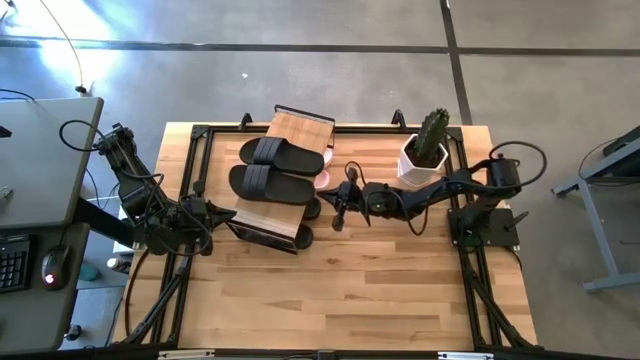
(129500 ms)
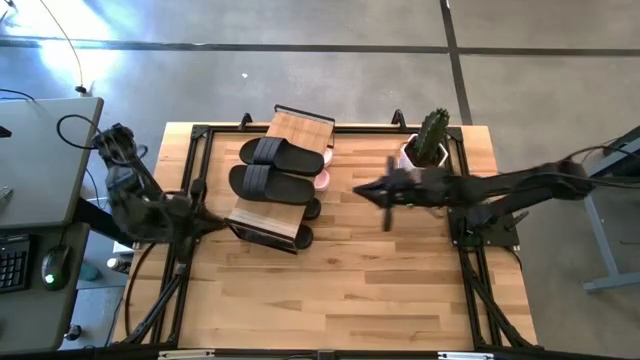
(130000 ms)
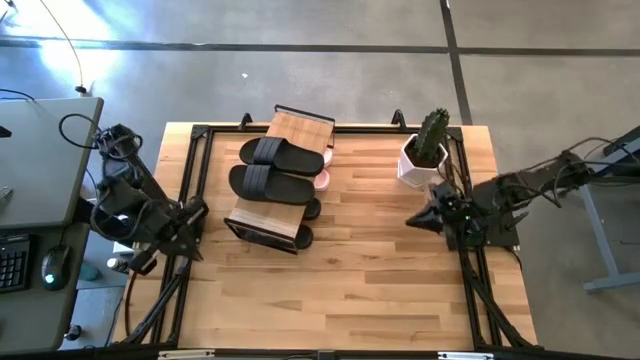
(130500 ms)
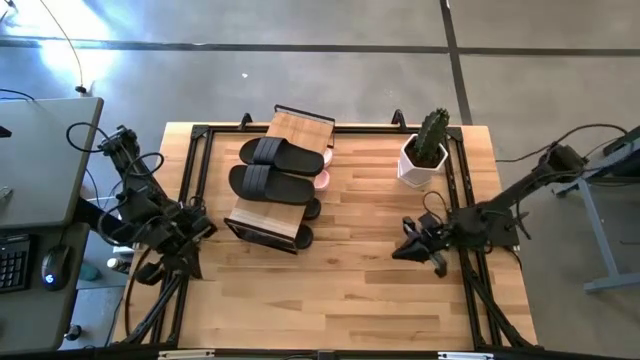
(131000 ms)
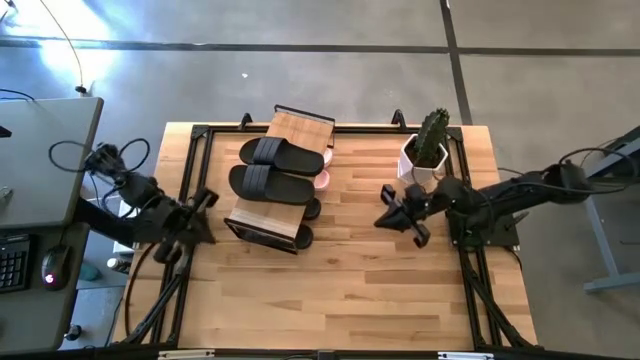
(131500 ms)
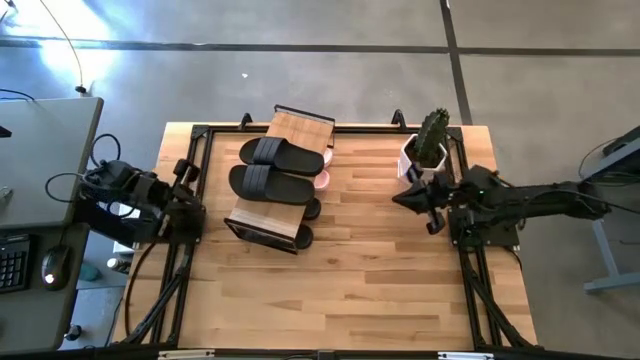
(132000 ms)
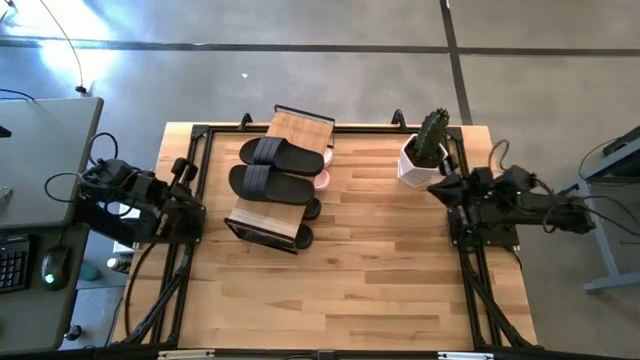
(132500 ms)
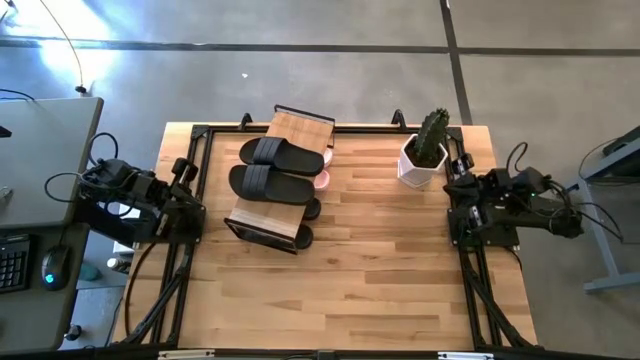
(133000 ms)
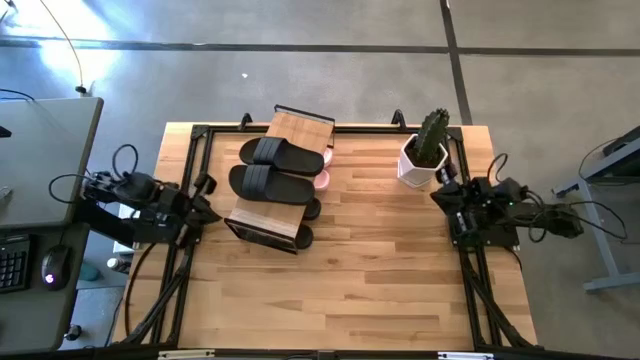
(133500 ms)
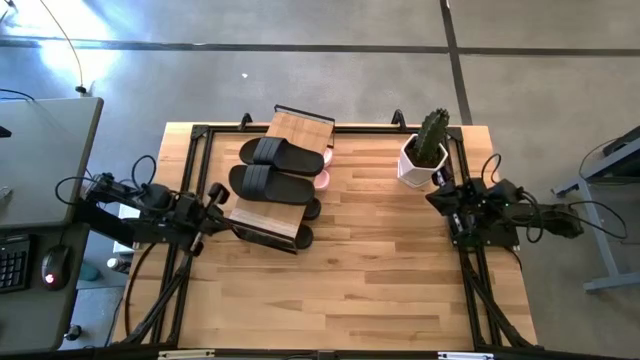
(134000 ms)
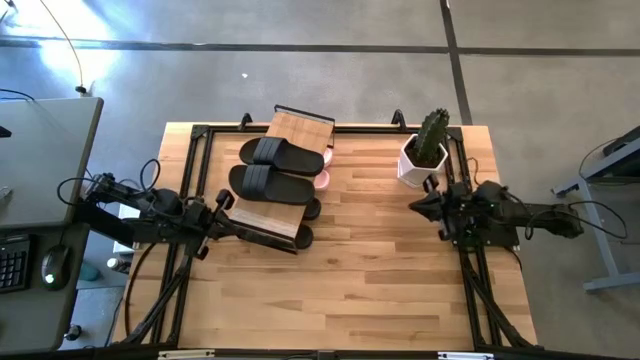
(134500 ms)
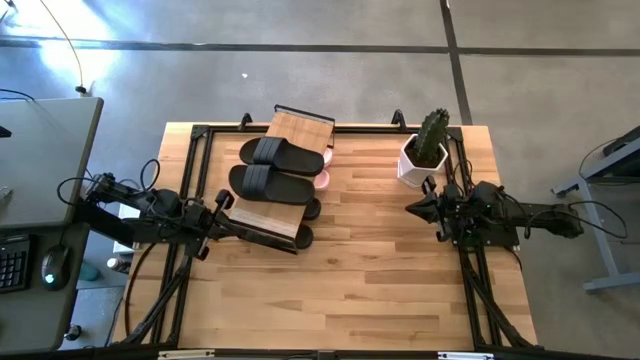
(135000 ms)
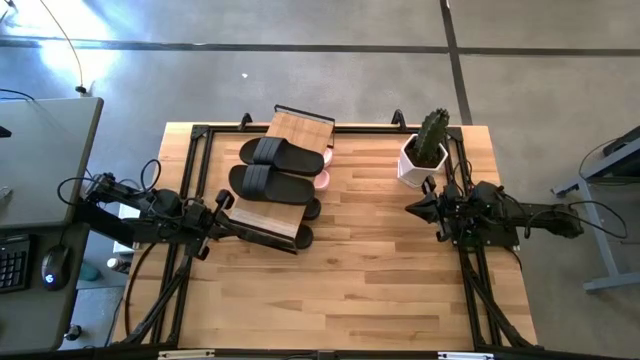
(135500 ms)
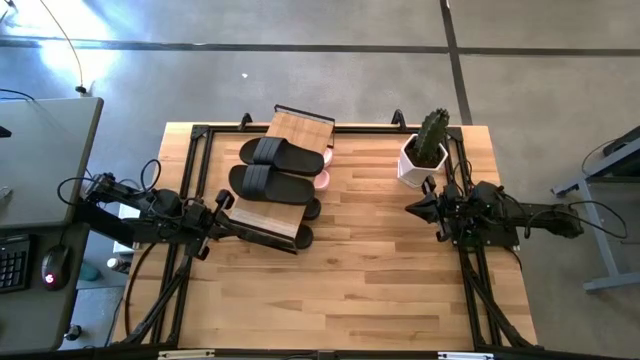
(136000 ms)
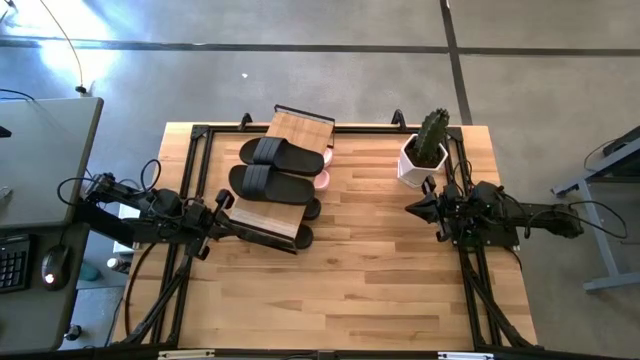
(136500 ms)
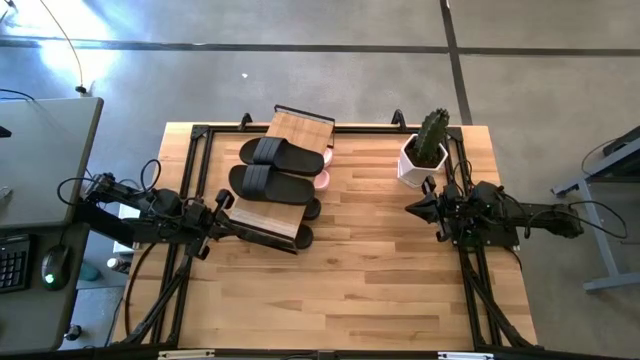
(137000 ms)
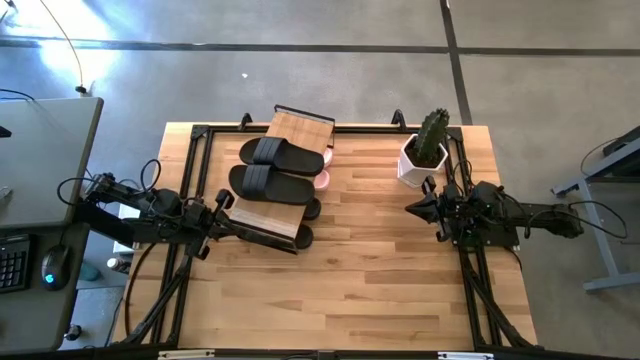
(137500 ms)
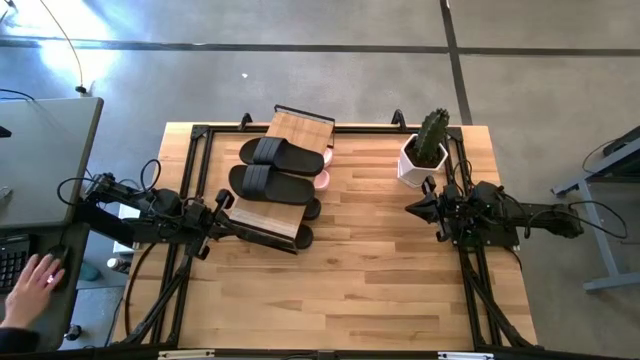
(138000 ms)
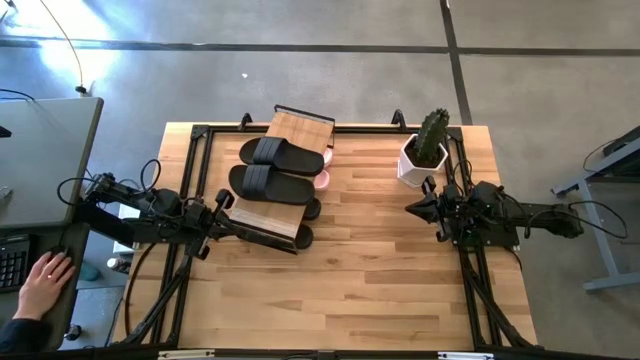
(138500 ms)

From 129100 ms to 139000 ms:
Task: Pick and place slides into the shelf
Return to Home Position

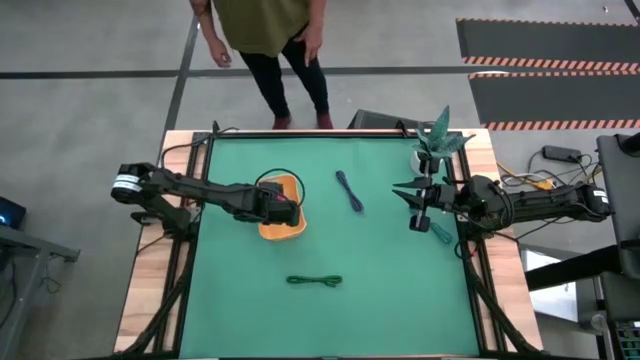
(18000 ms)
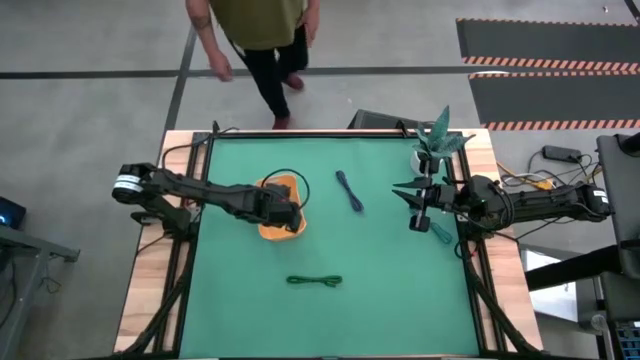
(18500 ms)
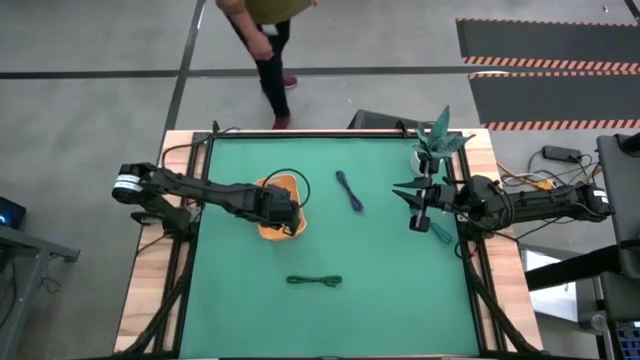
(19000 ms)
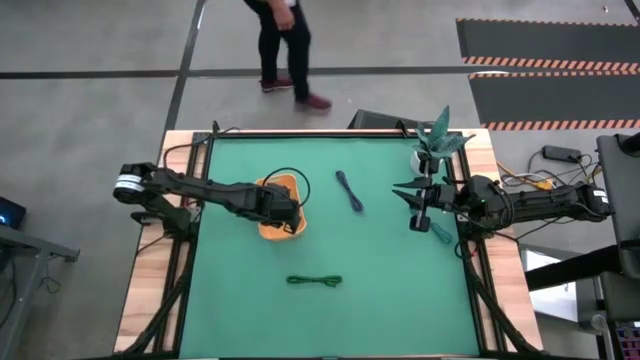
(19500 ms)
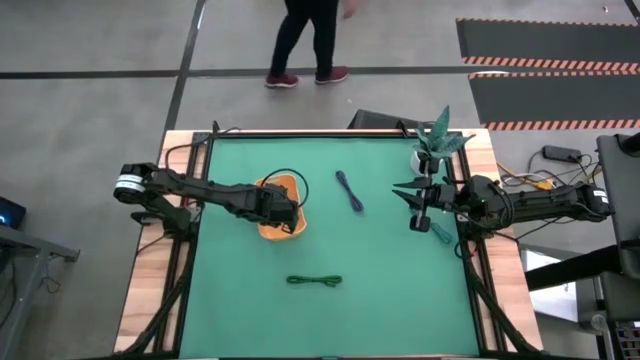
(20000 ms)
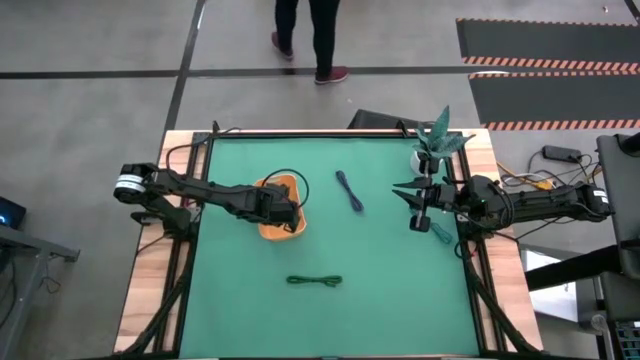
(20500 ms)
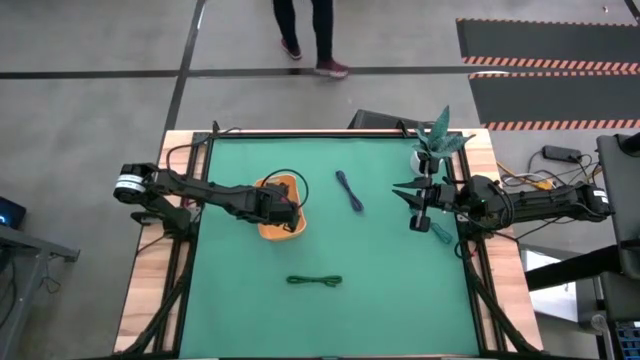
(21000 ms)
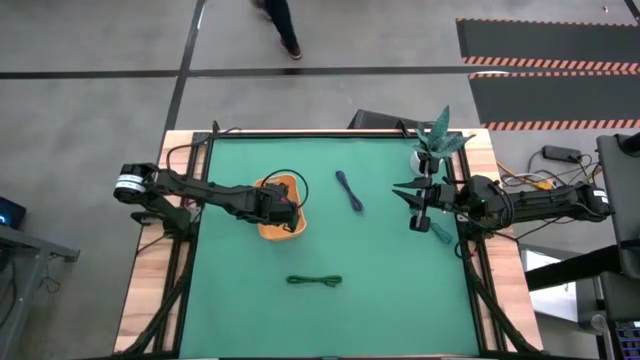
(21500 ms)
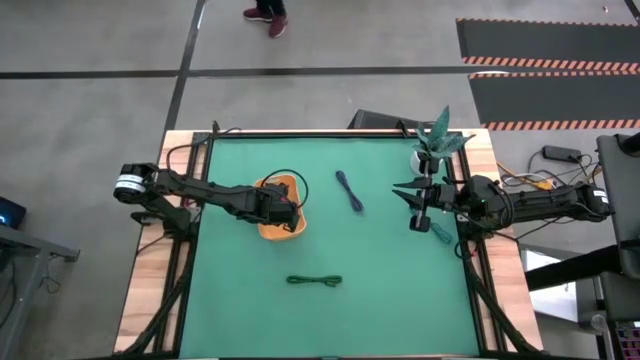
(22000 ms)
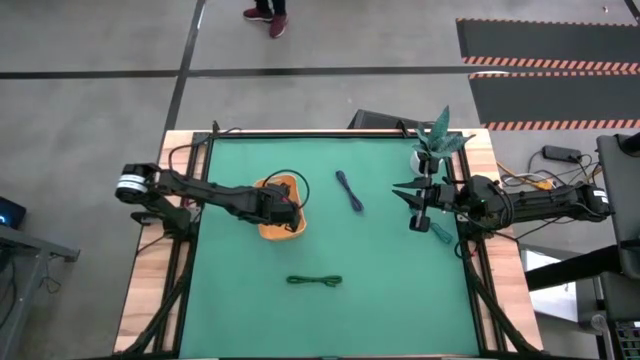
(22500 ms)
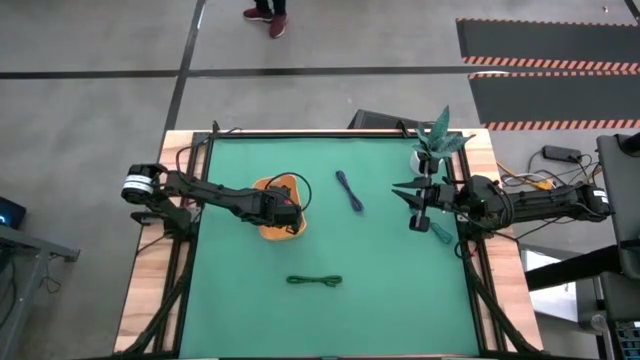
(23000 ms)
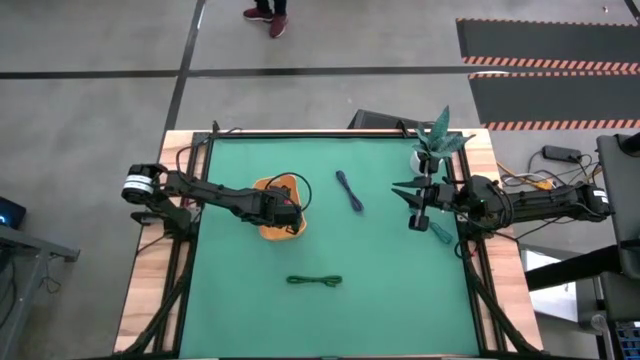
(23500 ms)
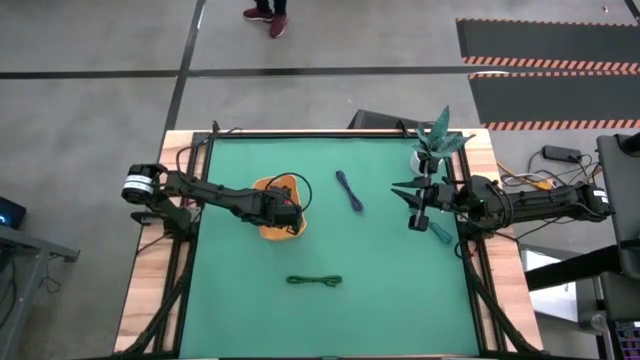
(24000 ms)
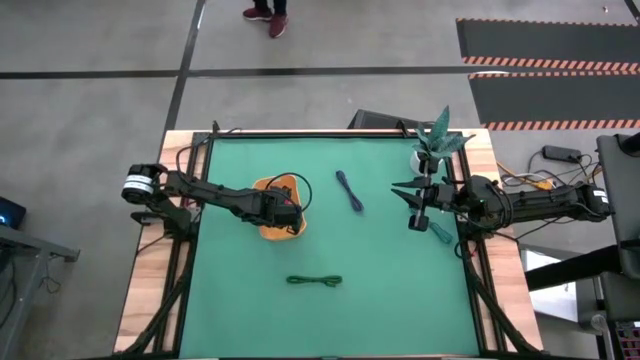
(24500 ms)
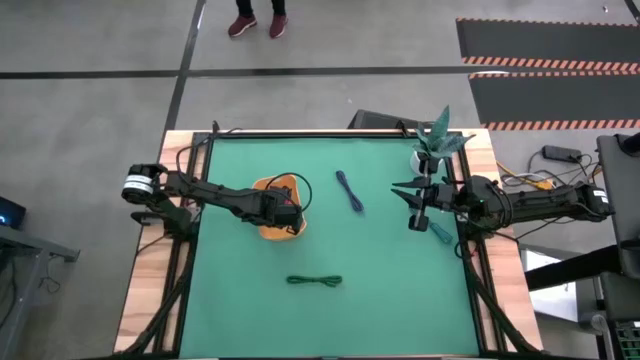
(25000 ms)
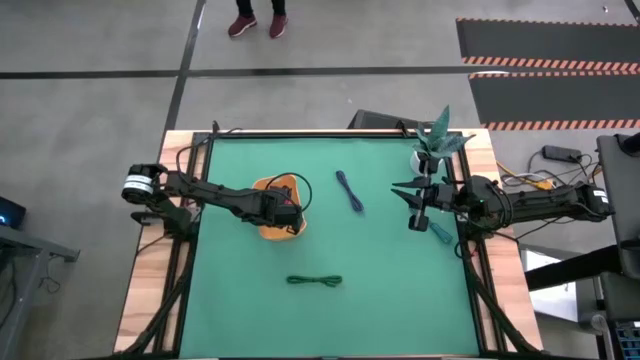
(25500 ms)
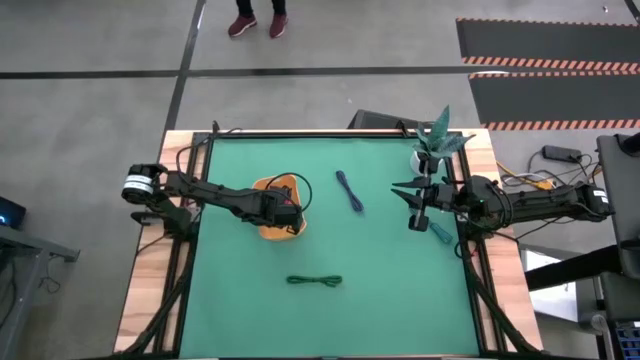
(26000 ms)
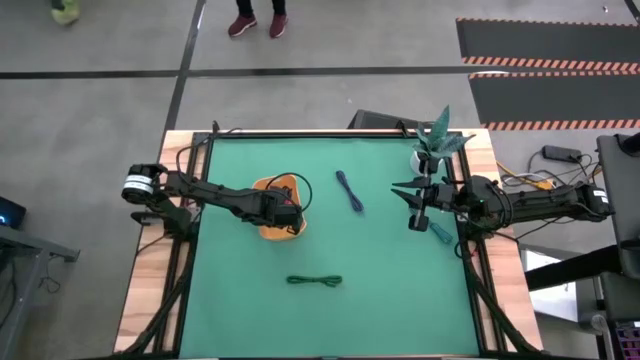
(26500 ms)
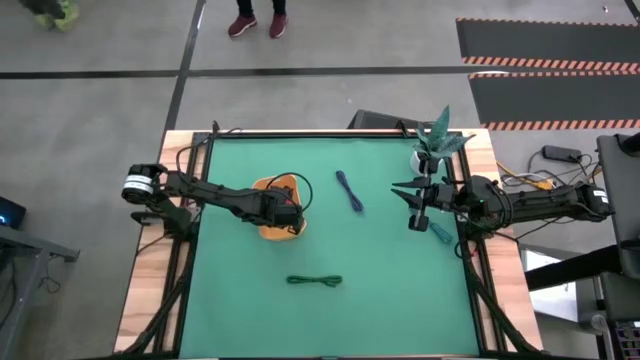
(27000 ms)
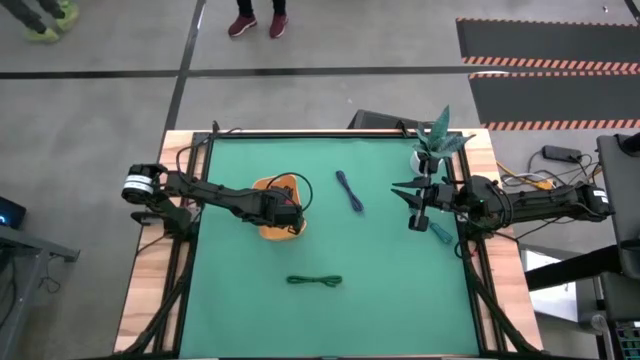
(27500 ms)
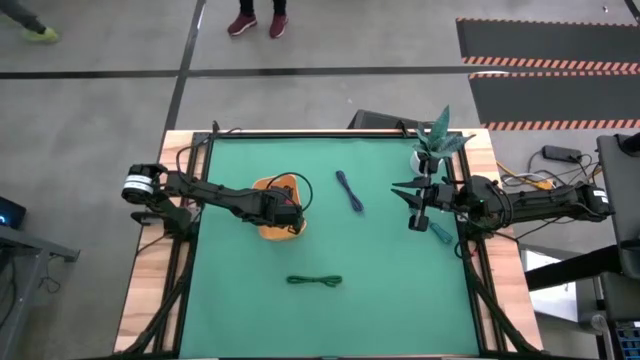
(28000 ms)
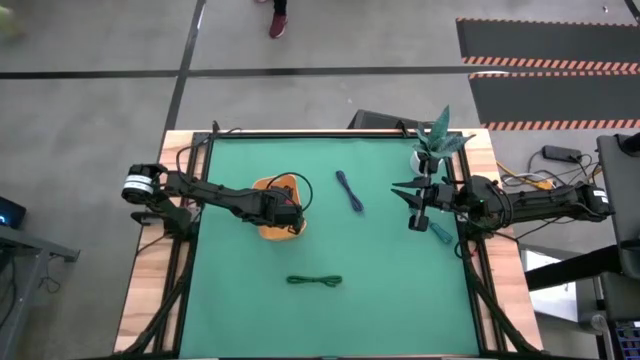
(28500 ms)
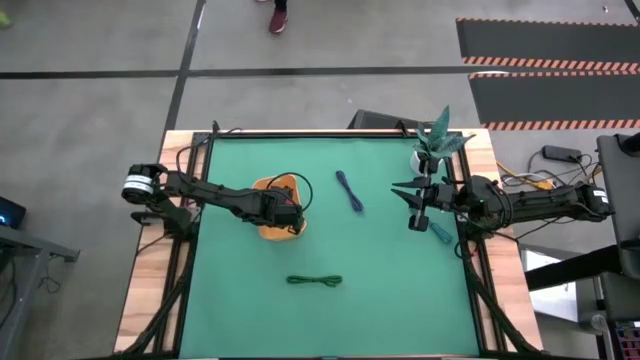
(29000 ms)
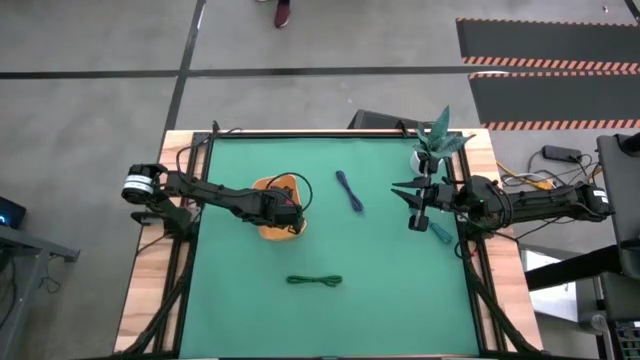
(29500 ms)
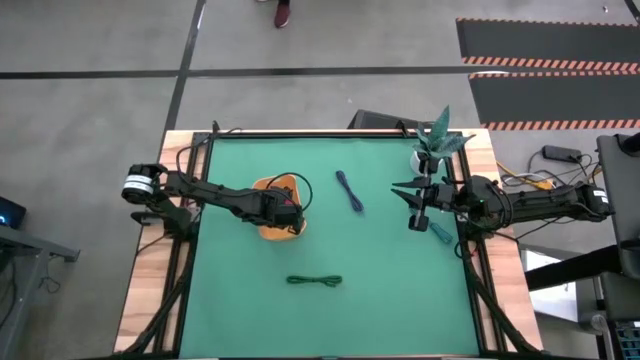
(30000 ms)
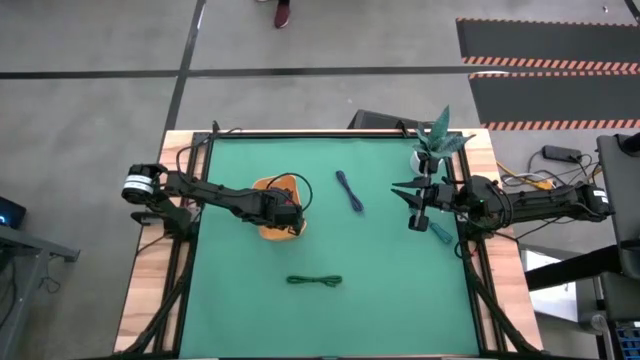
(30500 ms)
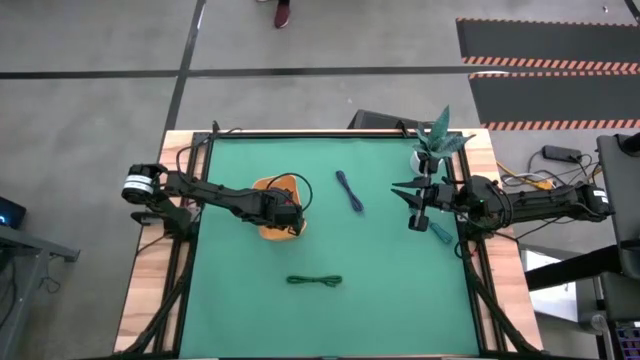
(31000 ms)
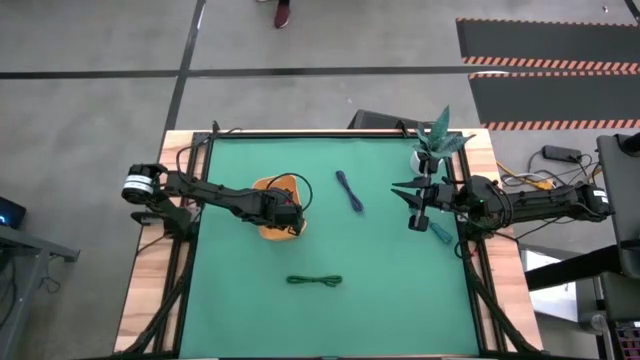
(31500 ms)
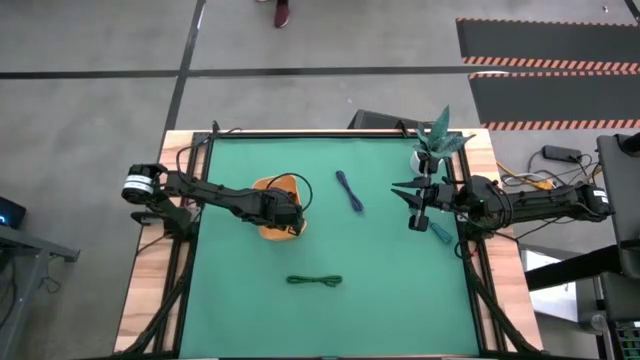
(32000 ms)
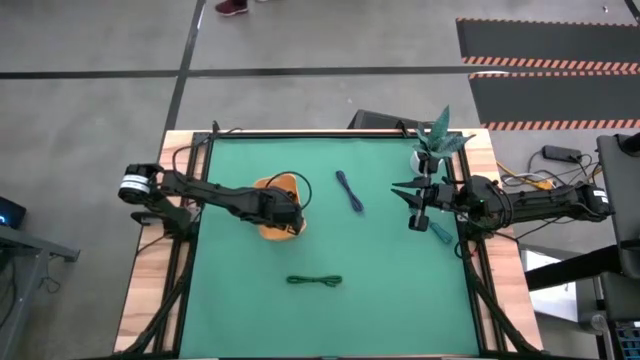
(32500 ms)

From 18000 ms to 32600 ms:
Task: Pick and place USB-C Cables
Put the black USB cable into the orange bin
